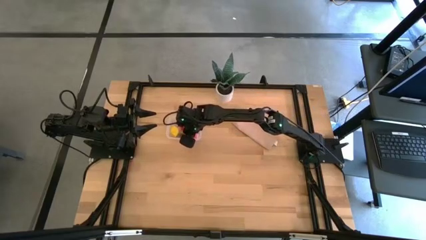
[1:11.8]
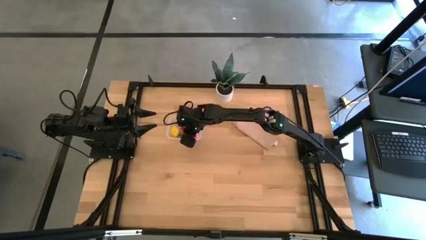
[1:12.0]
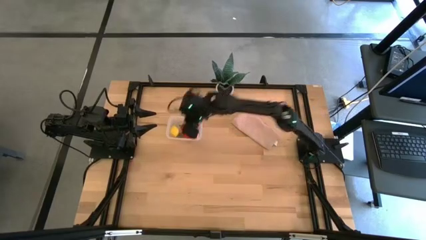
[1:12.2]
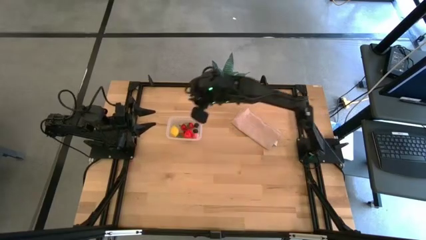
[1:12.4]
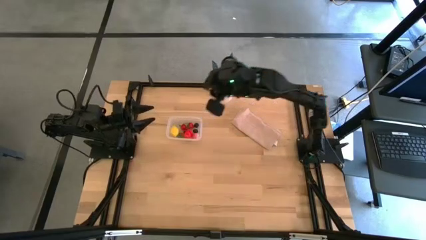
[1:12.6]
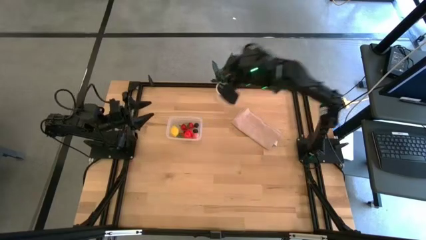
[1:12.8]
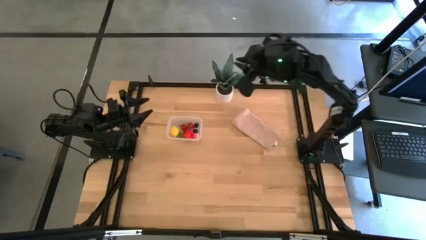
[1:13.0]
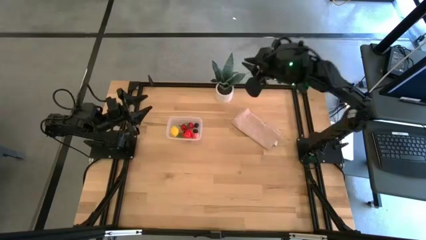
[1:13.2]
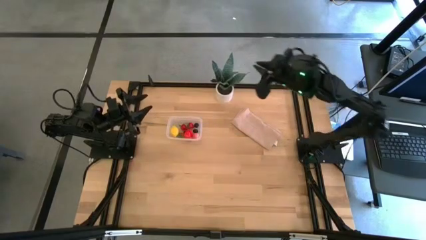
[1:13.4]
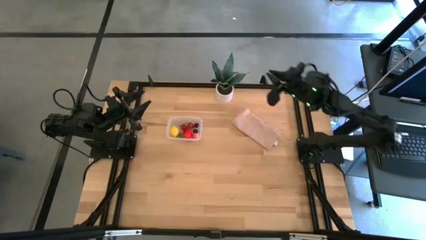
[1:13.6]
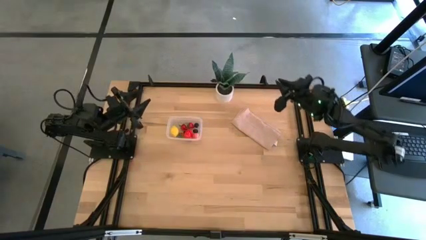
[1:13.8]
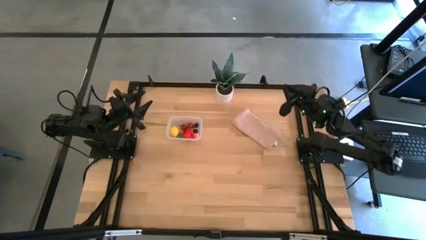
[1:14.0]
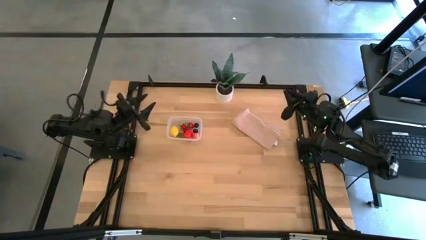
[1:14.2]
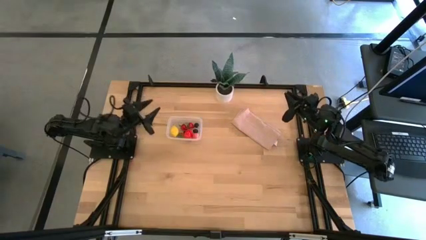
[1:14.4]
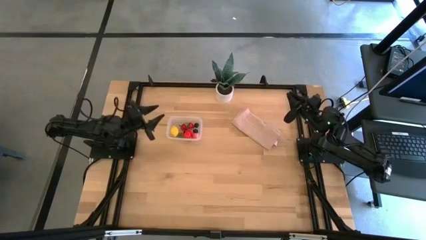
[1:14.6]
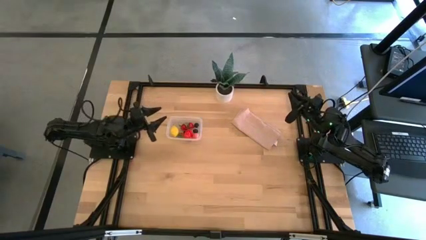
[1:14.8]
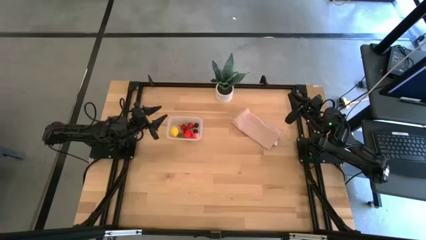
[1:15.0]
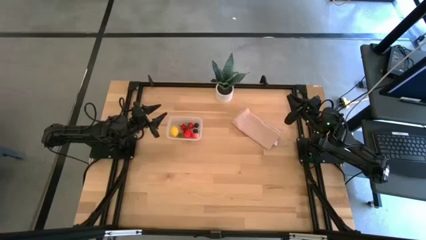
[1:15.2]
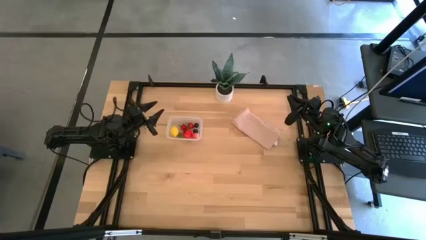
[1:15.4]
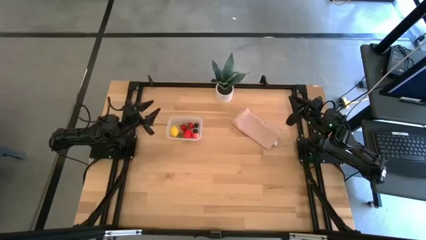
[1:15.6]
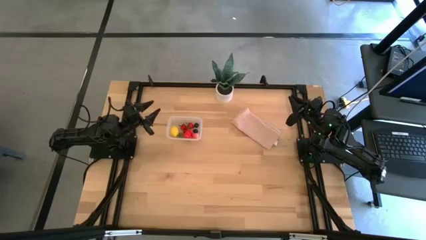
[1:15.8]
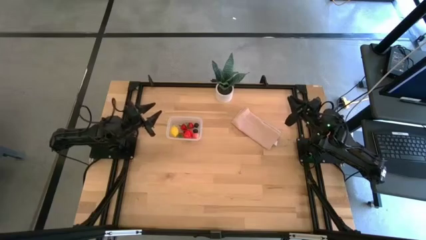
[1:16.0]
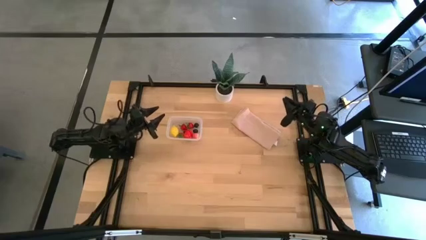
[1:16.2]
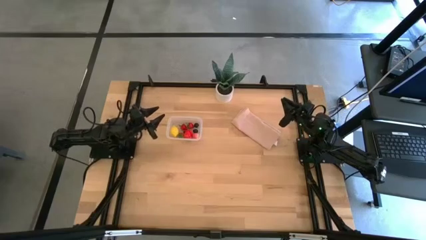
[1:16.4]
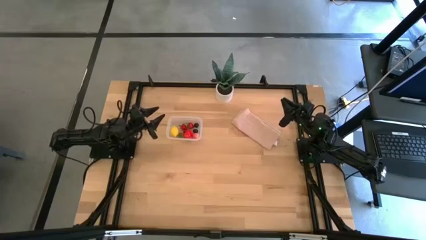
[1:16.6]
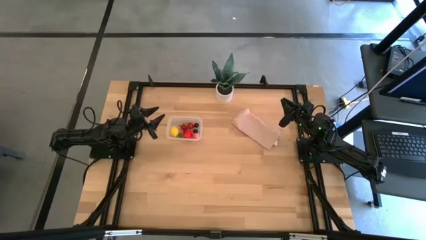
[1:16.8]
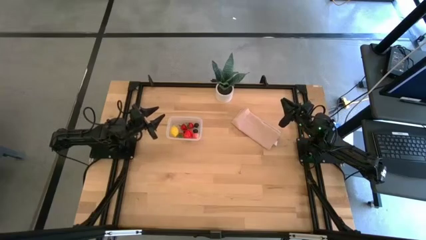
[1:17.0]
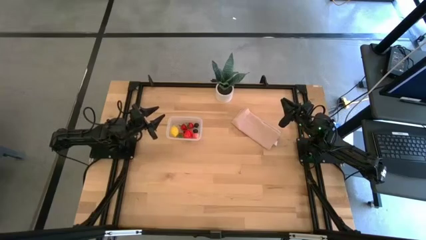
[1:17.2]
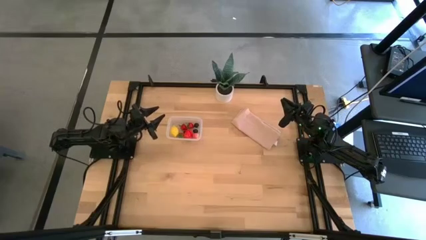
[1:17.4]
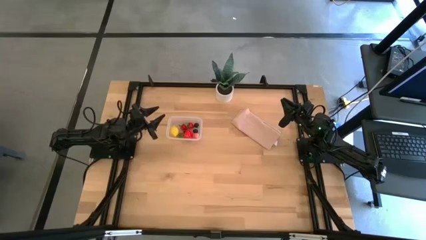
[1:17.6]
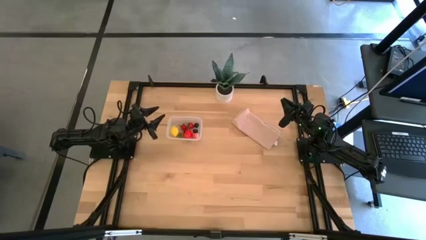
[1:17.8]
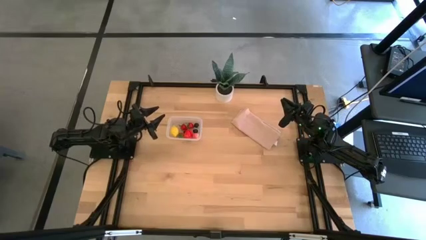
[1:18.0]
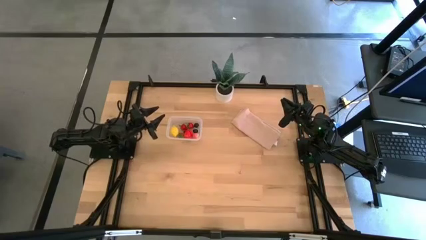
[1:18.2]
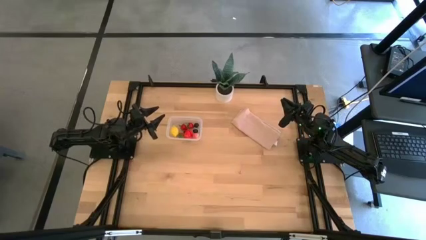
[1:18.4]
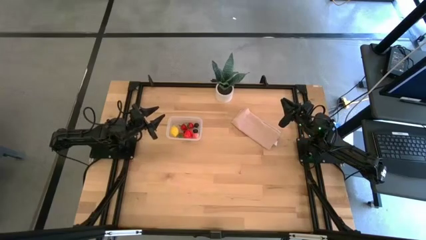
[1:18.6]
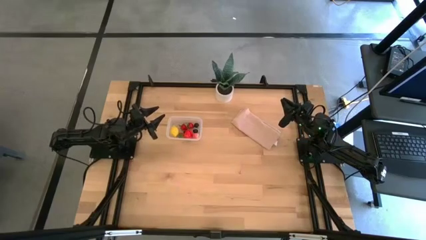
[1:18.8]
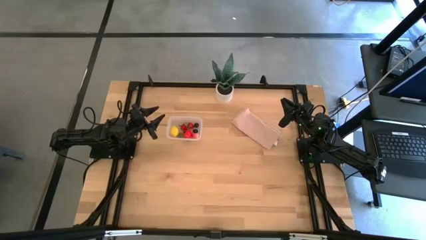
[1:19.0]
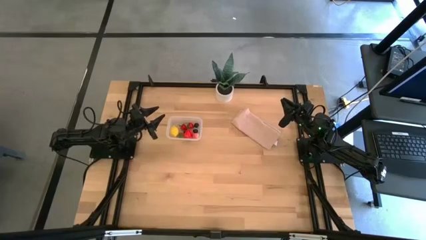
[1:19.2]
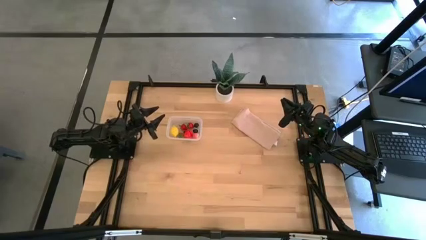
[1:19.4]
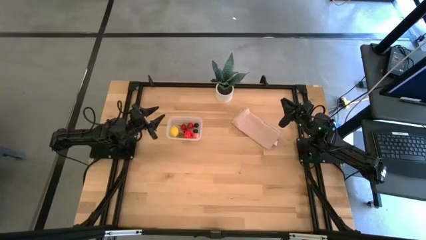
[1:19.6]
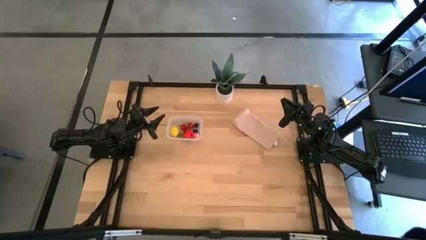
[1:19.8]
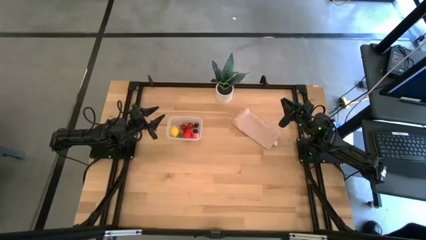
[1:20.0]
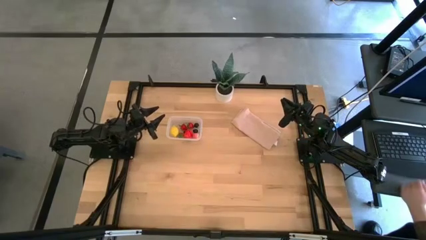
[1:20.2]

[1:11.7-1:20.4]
Task: Pick and placing Produce into tupperware
Return to Home Position

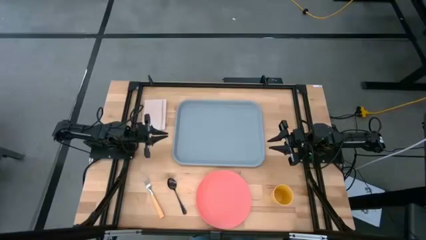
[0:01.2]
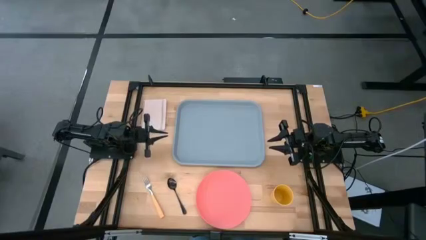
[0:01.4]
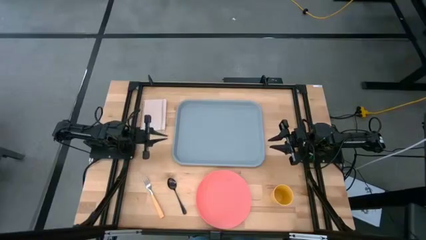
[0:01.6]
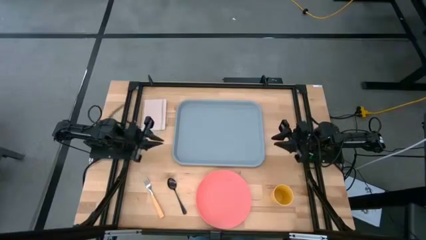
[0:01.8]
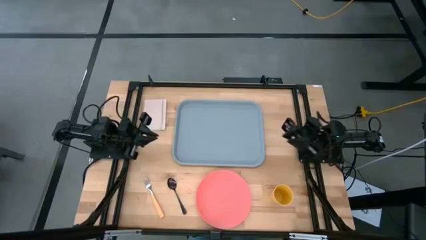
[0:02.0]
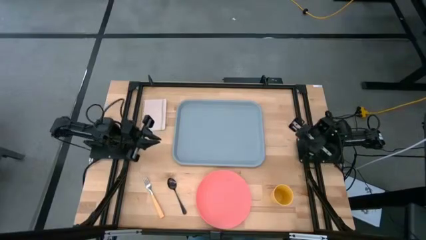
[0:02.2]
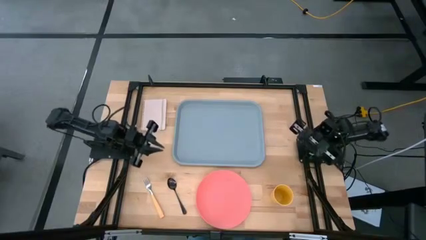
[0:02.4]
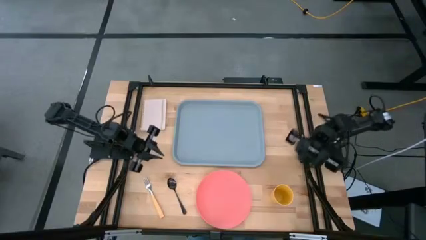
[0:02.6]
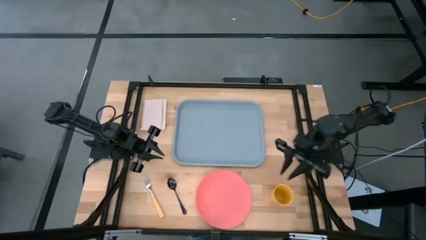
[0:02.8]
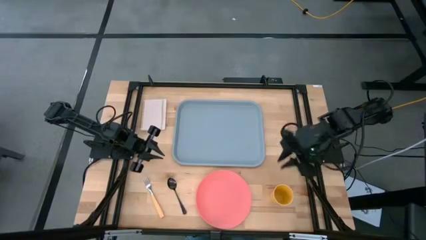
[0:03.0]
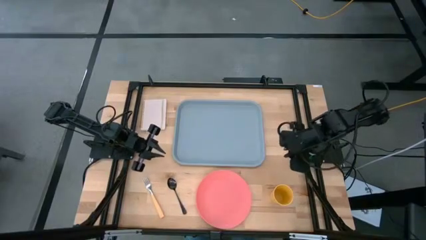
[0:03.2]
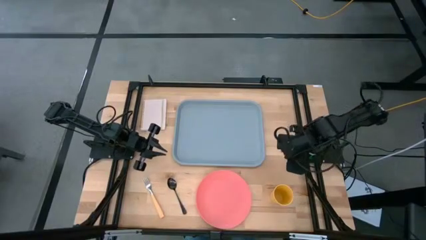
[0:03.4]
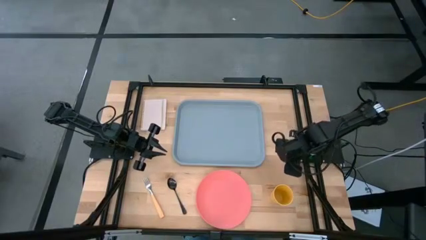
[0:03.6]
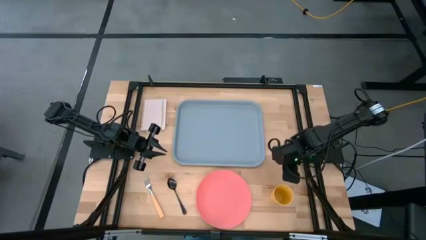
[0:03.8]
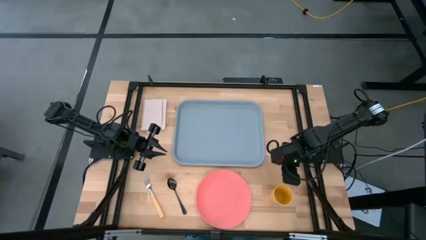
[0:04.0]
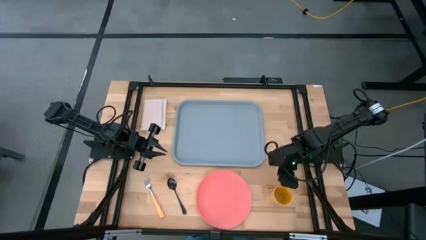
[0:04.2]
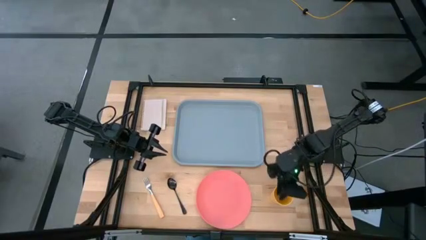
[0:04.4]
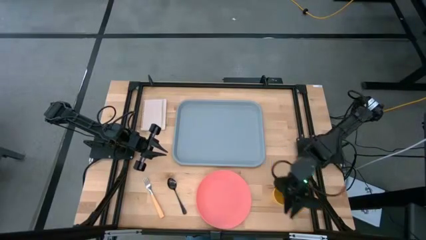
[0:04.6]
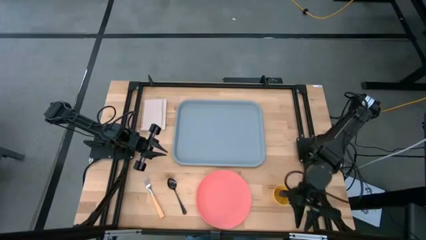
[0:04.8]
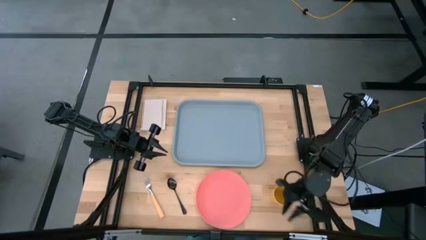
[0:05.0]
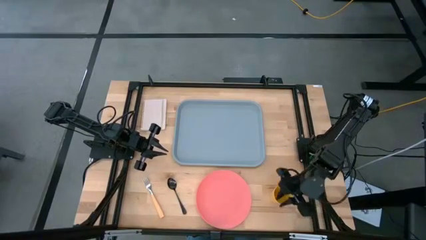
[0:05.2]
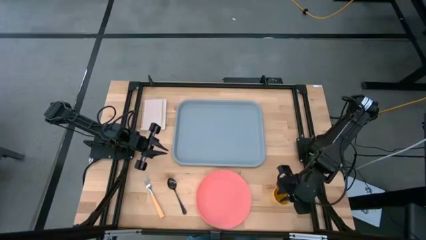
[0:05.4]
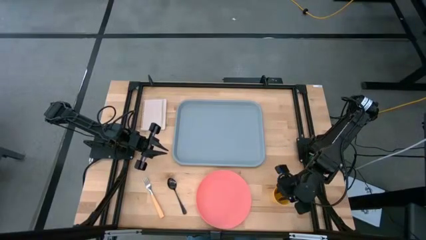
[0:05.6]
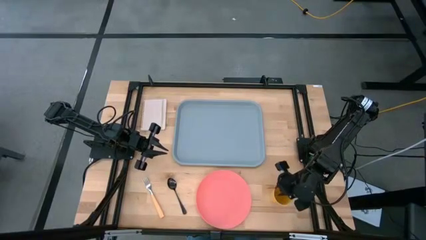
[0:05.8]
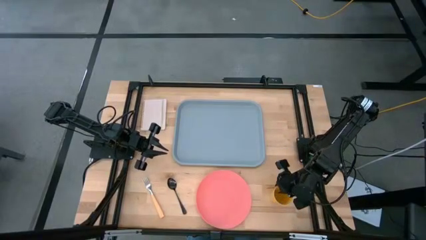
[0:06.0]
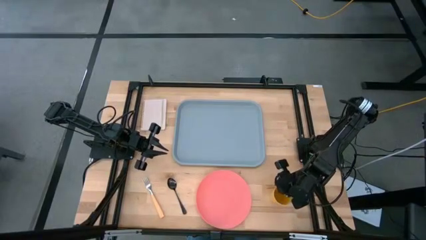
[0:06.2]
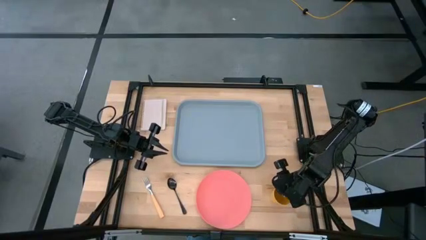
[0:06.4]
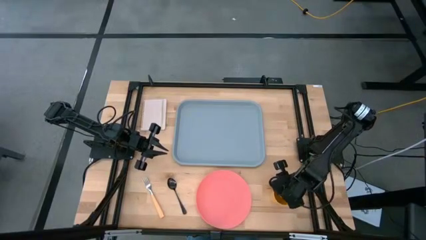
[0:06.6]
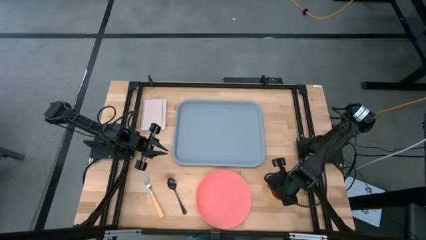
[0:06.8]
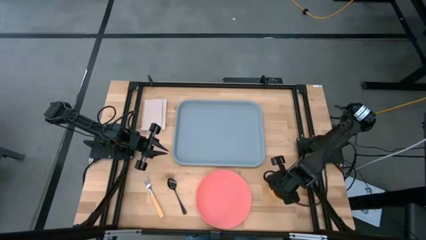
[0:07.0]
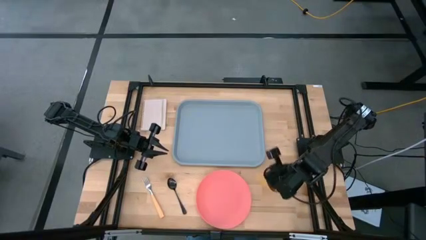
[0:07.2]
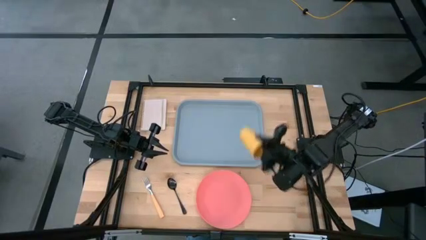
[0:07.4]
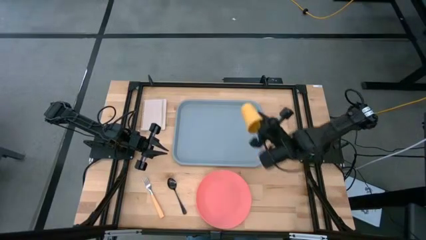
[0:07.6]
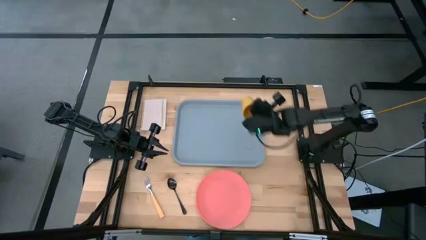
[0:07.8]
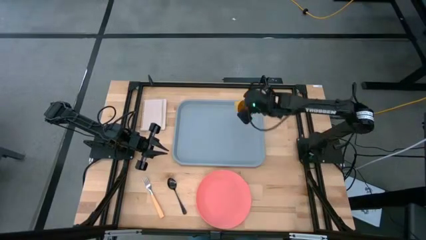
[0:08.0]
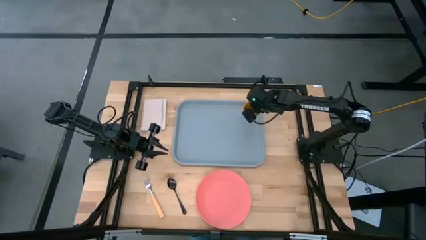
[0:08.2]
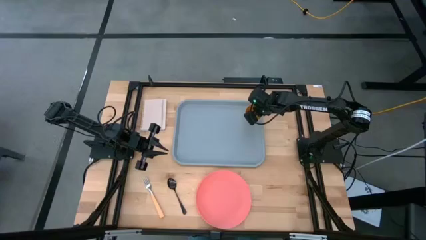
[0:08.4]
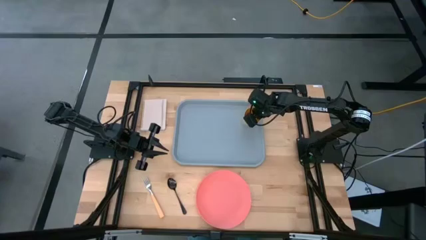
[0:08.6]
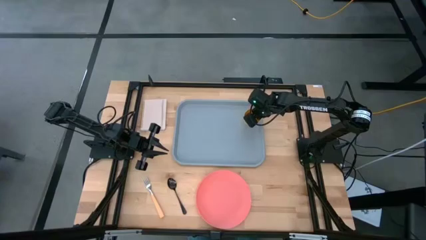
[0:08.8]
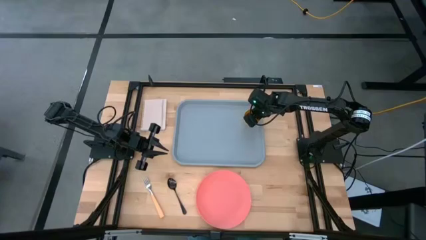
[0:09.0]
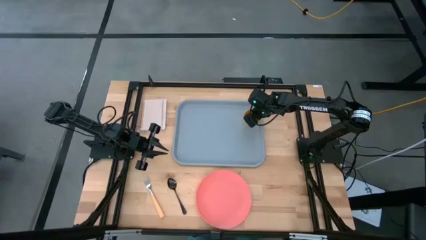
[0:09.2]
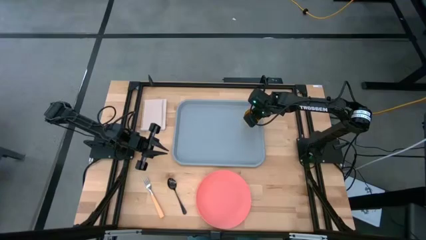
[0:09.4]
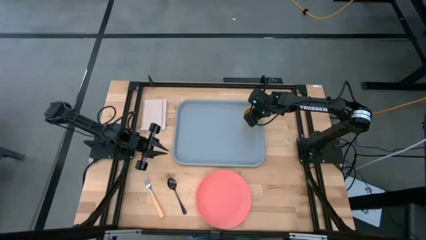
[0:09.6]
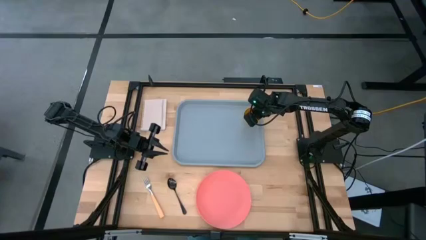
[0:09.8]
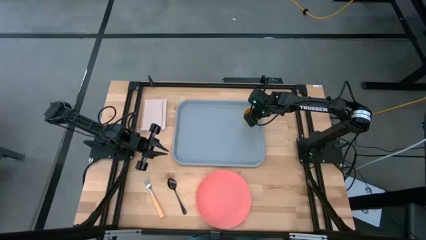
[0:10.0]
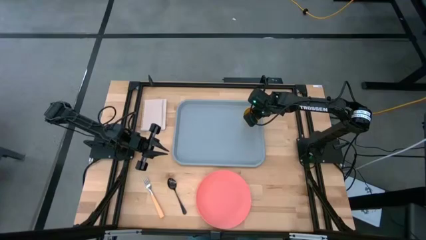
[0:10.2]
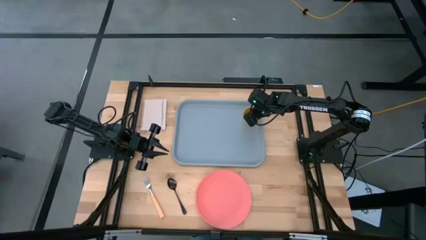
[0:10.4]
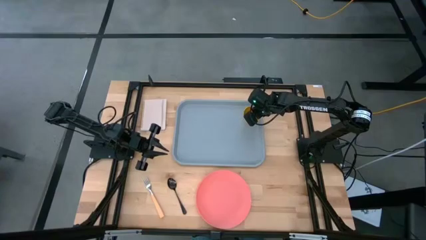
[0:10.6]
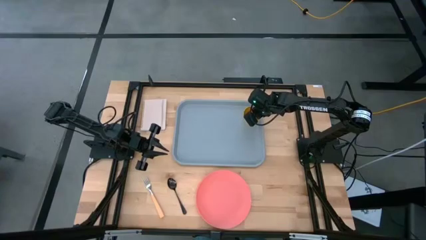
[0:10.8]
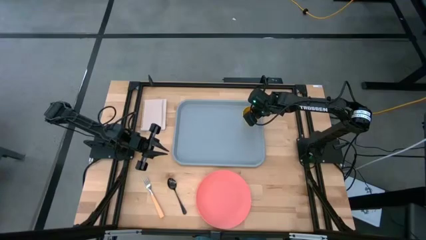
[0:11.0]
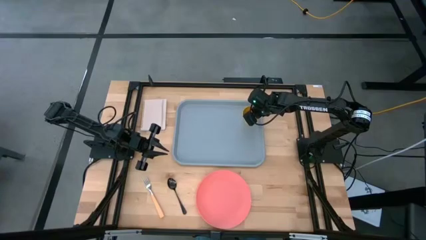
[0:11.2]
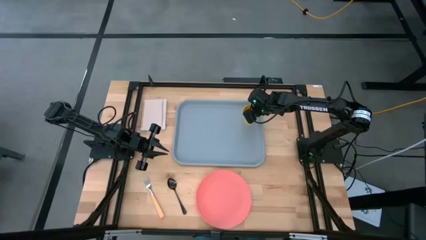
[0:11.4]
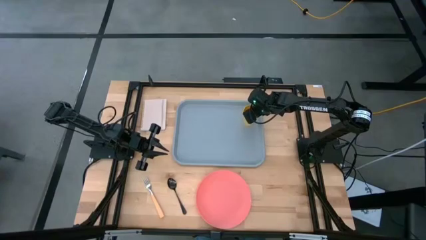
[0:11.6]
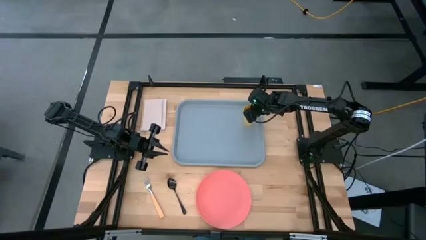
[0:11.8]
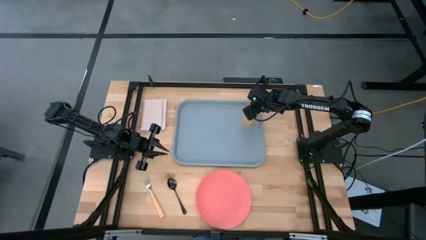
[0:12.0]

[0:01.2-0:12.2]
Task: Pick and place plate/cup/fork/spoon on tray
Put the yellow cup on the serving tray
